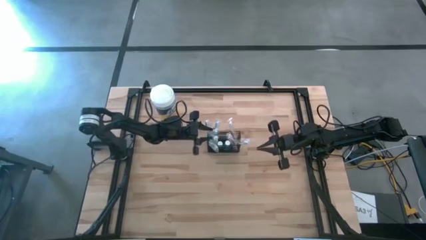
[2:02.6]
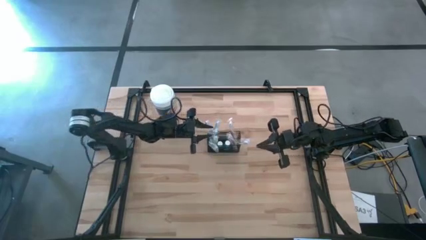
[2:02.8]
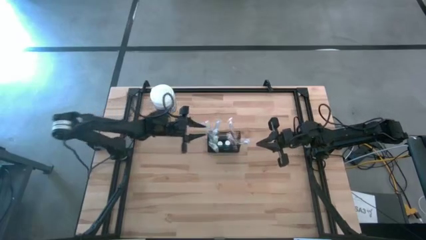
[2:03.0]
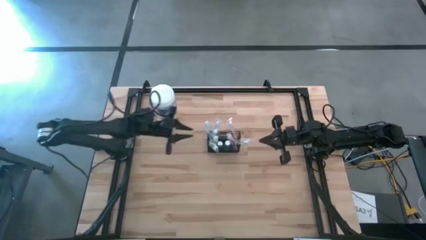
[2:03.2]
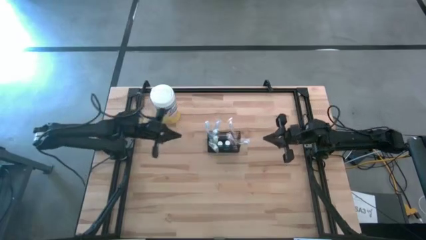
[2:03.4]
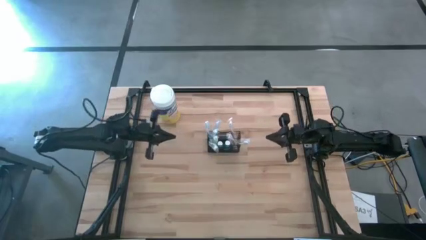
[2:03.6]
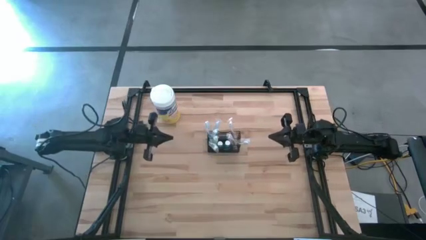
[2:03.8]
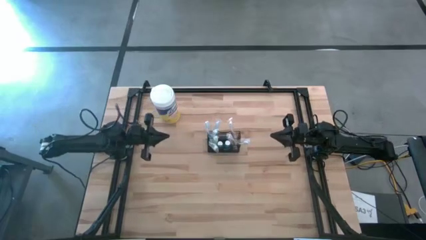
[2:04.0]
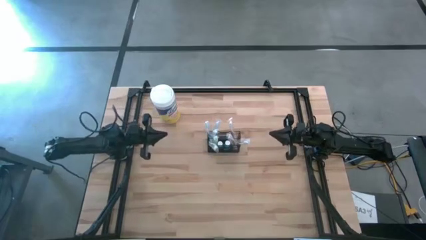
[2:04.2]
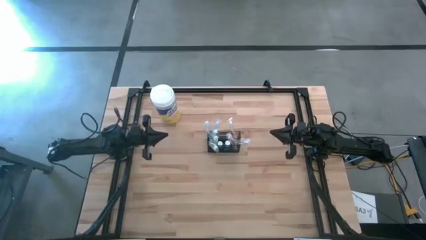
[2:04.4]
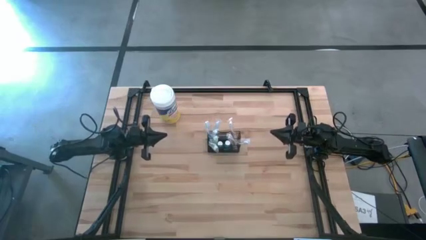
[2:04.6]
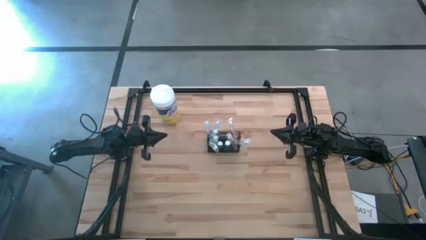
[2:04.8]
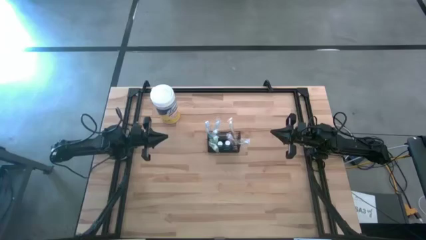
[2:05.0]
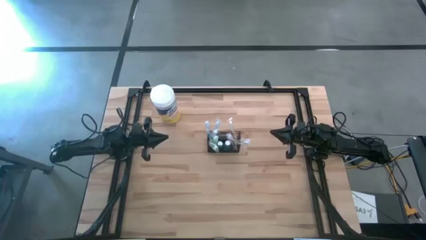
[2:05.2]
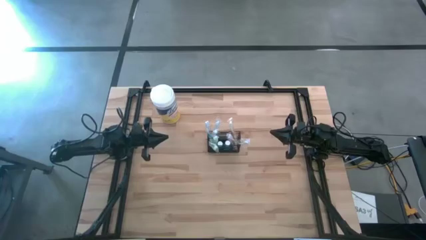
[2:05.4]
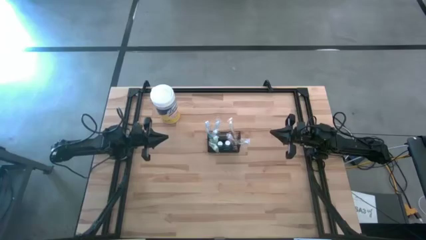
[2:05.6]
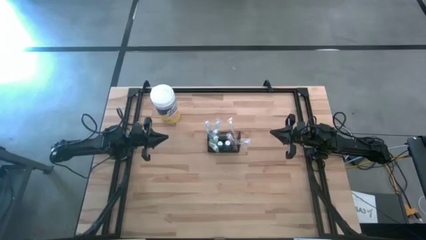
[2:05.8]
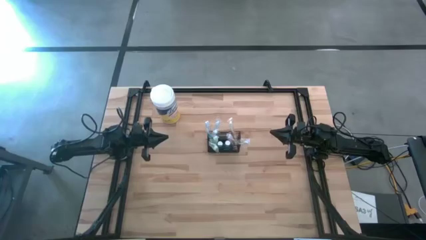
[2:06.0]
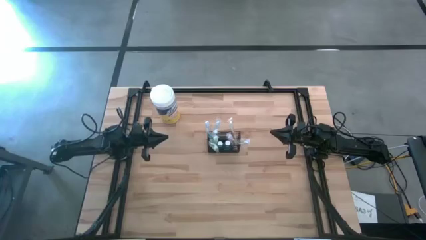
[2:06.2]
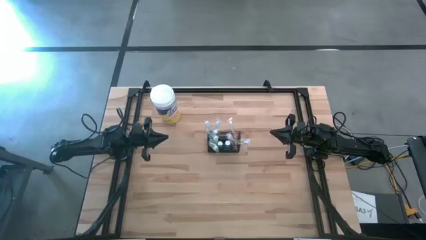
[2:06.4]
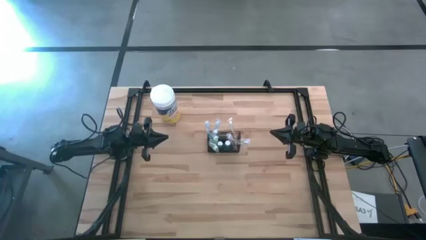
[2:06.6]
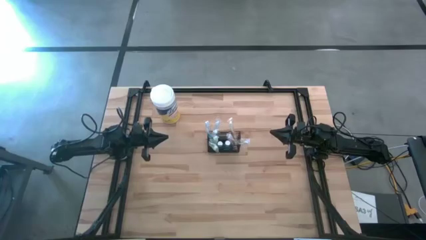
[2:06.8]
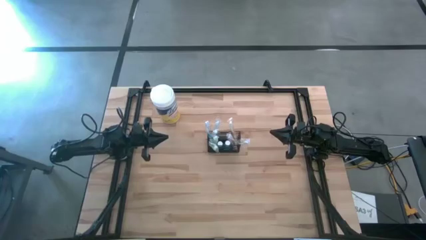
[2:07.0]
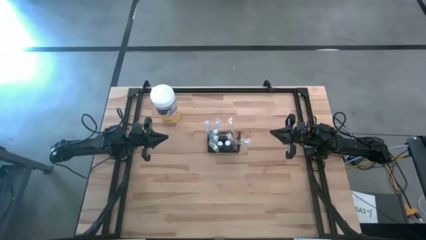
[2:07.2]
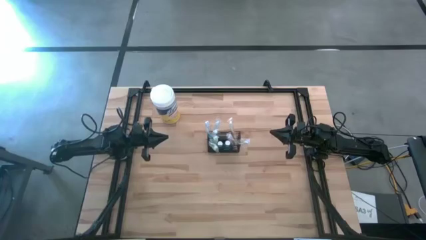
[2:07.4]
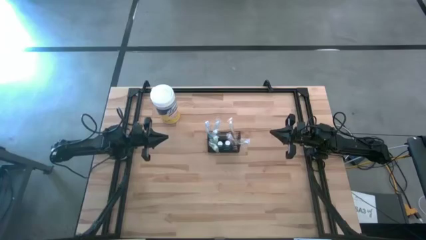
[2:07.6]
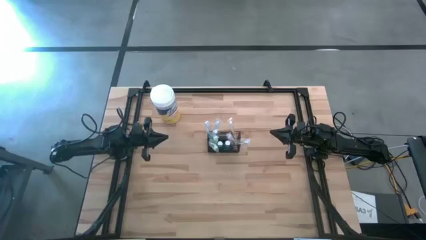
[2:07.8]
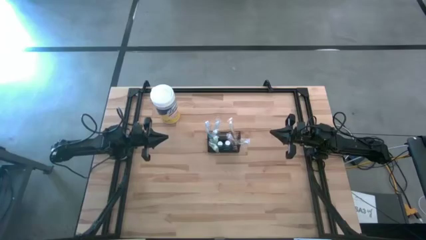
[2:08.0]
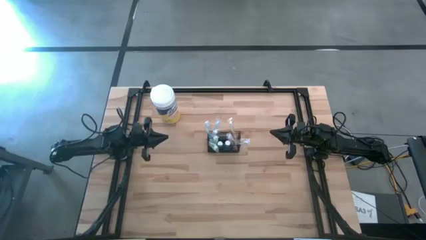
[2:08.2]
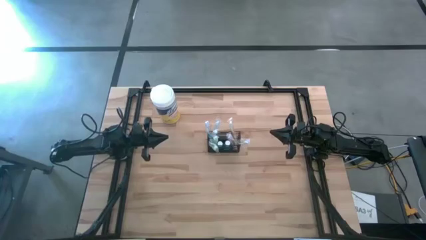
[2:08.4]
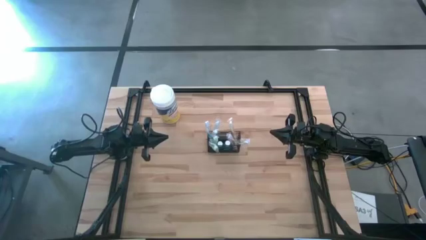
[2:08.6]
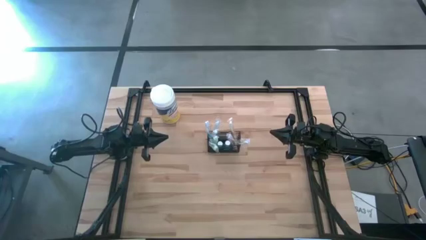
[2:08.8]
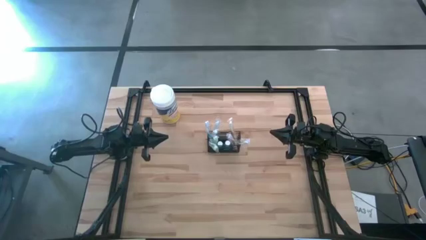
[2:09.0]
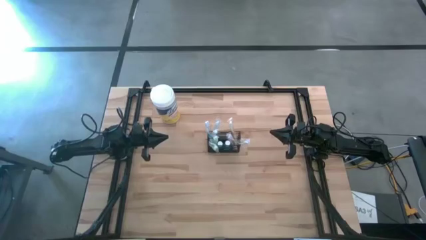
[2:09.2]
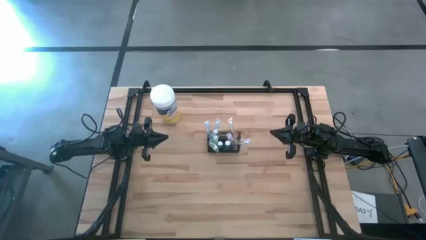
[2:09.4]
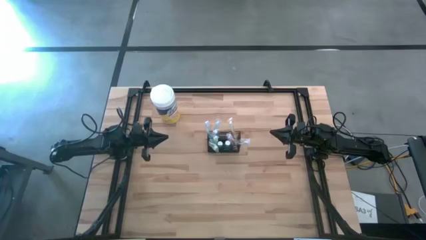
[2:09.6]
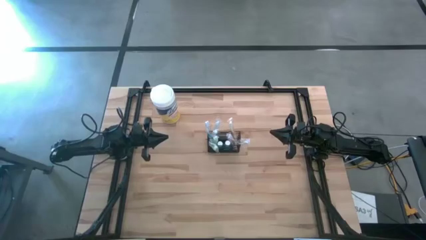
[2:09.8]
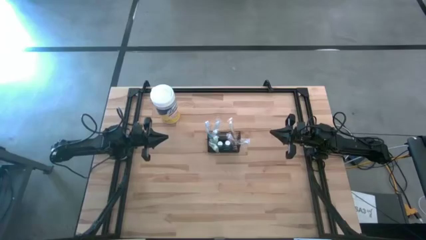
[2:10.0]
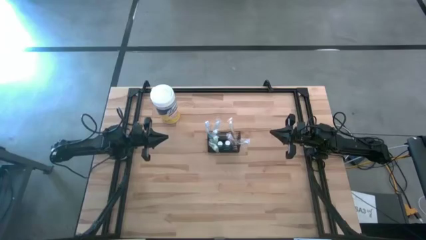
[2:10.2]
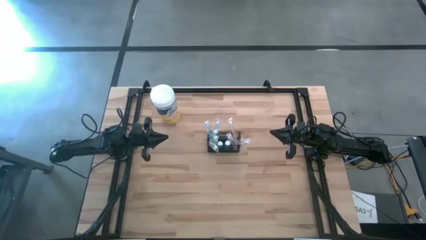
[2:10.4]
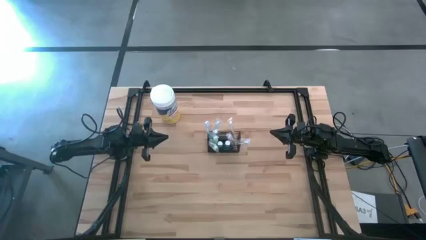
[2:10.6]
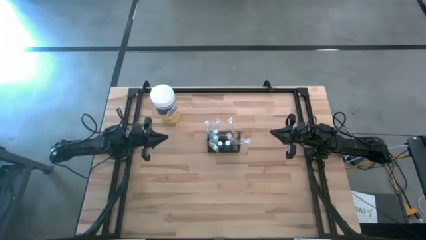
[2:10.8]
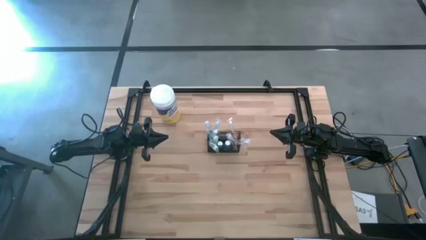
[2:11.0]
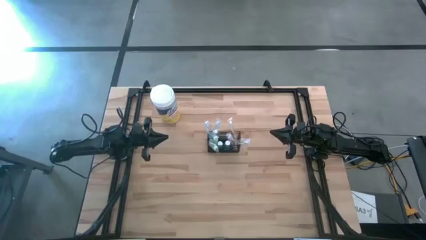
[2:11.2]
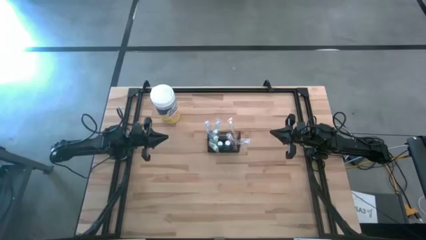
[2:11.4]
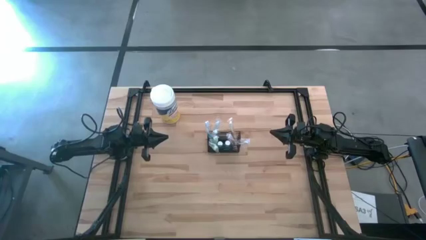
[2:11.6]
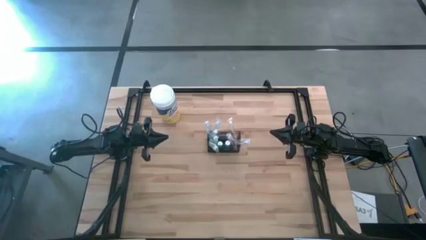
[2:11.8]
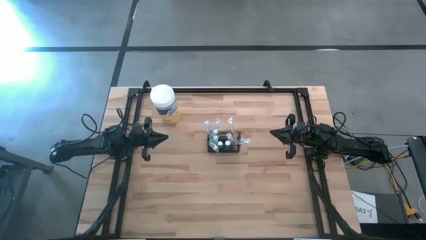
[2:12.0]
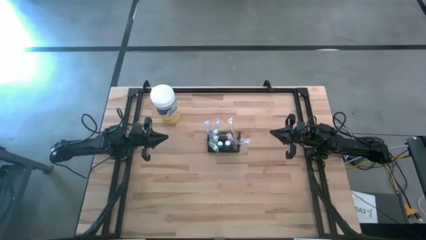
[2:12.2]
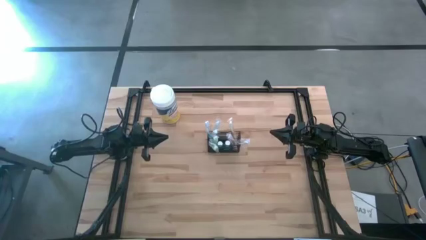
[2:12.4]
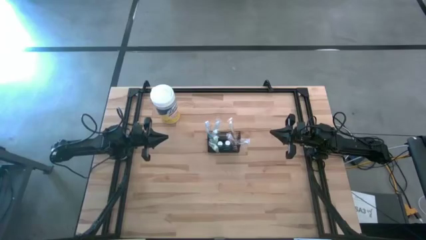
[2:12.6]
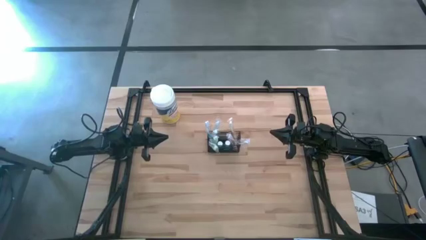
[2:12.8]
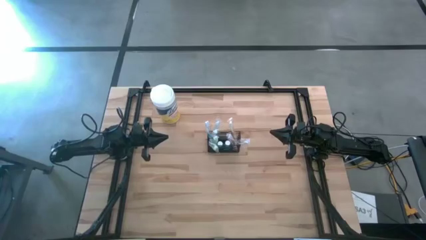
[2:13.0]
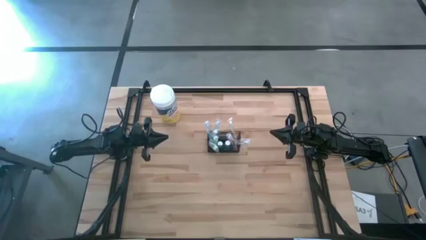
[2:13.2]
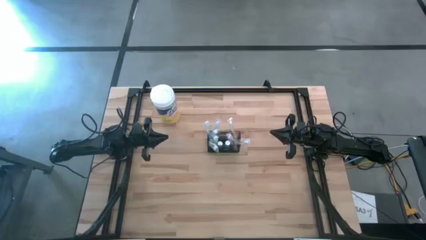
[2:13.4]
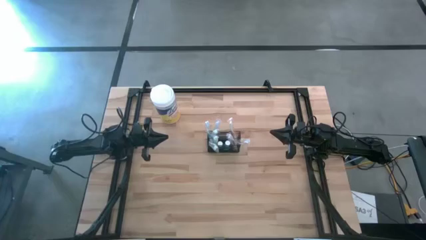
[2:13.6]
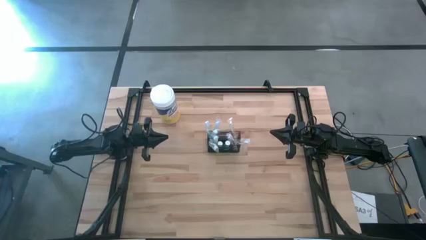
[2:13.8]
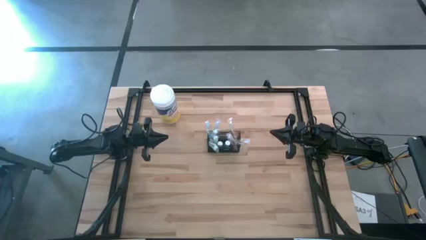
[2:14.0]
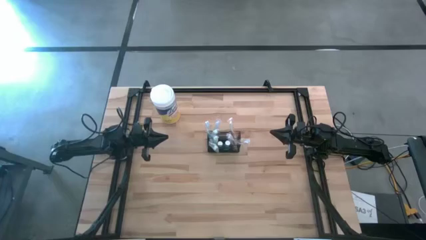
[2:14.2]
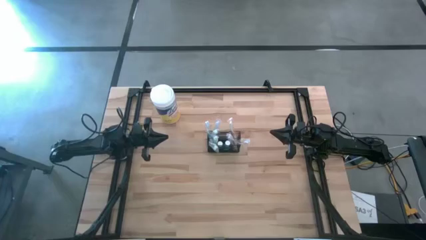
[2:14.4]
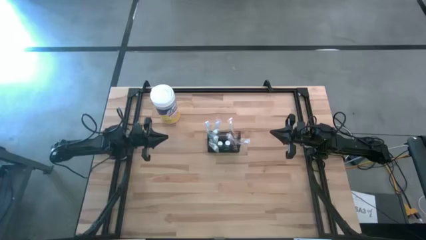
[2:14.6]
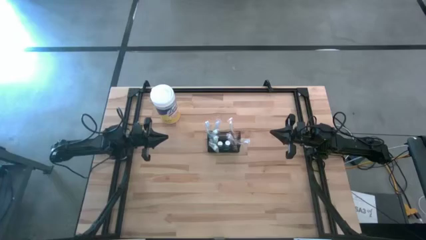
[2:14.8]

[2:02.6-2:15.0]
Task: Pick & Place toothbrushing station
Return to Home Position
